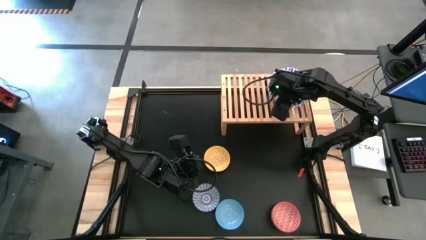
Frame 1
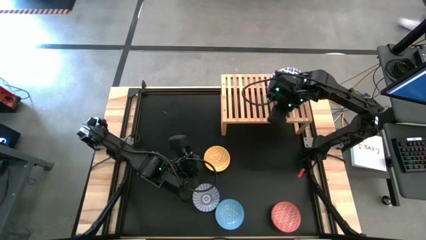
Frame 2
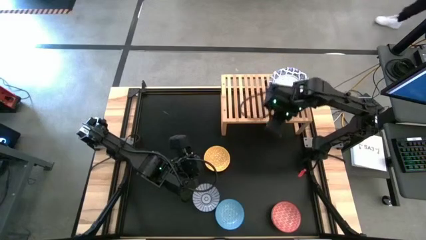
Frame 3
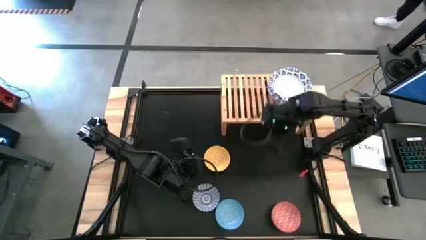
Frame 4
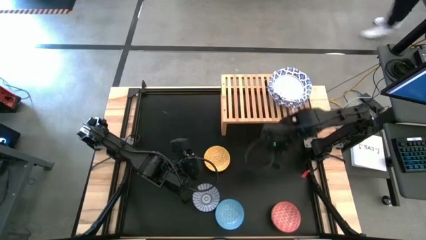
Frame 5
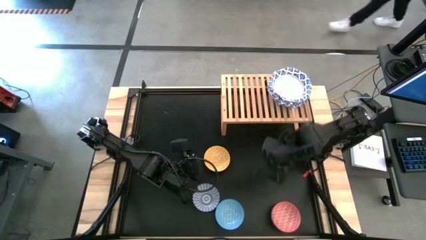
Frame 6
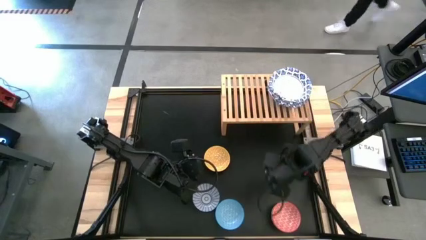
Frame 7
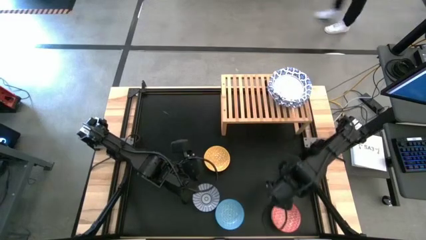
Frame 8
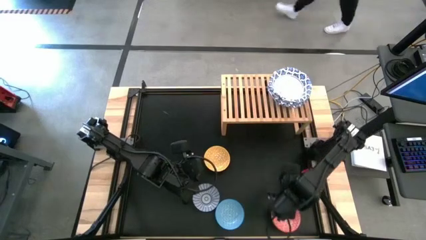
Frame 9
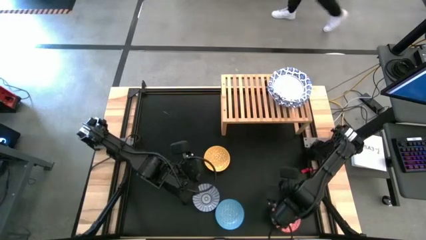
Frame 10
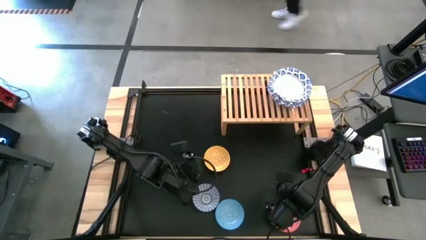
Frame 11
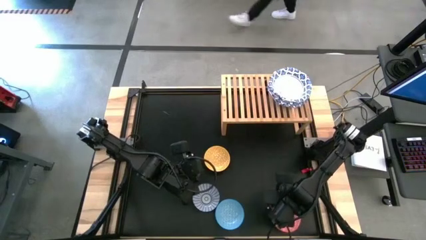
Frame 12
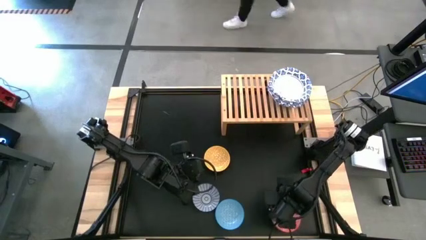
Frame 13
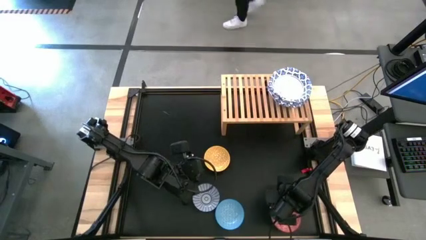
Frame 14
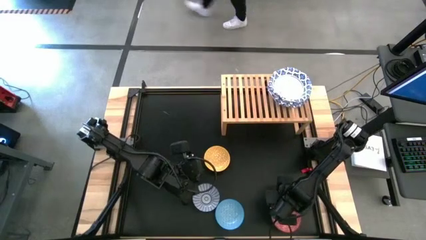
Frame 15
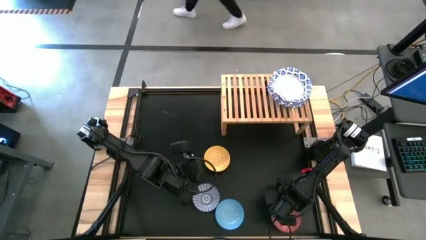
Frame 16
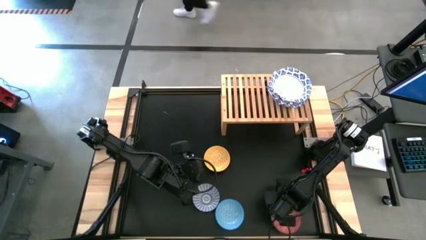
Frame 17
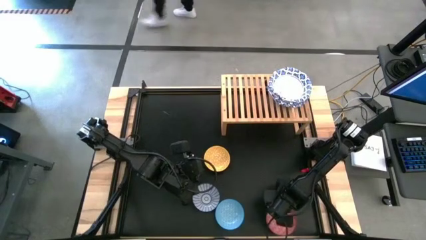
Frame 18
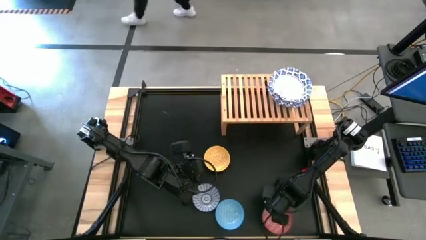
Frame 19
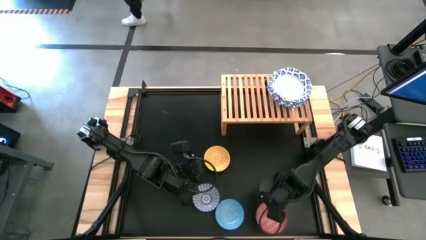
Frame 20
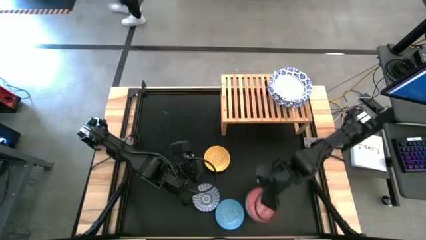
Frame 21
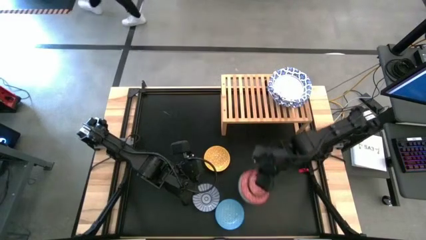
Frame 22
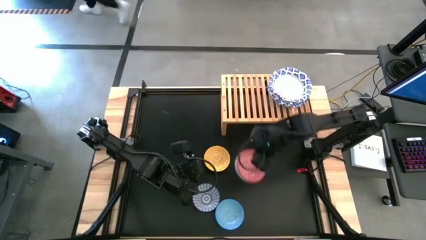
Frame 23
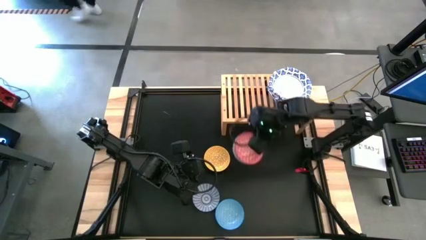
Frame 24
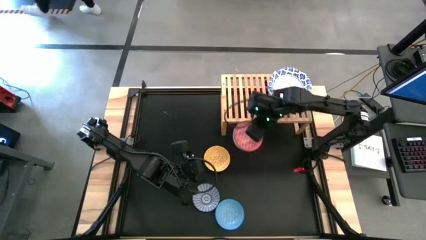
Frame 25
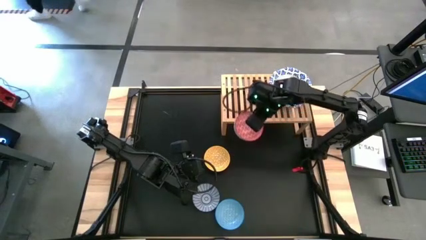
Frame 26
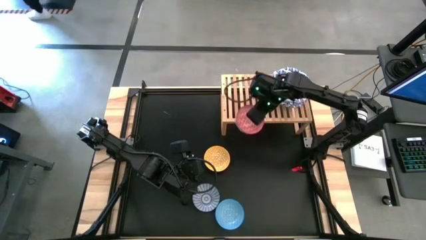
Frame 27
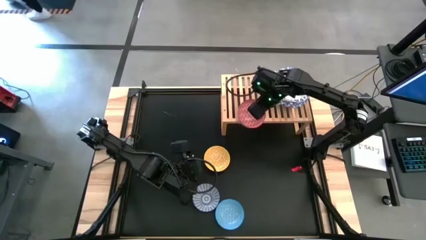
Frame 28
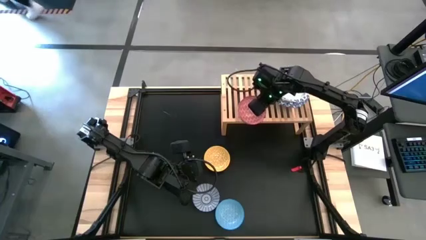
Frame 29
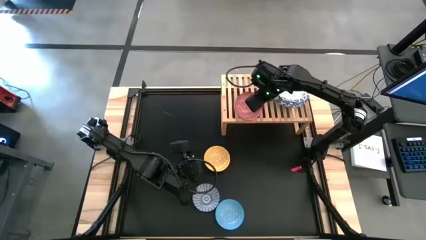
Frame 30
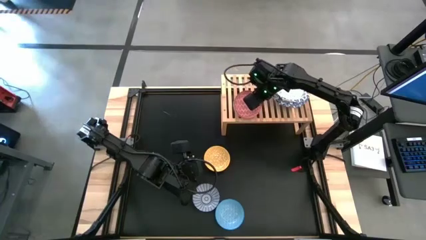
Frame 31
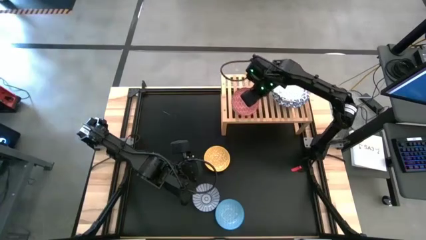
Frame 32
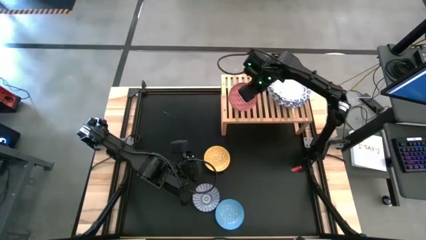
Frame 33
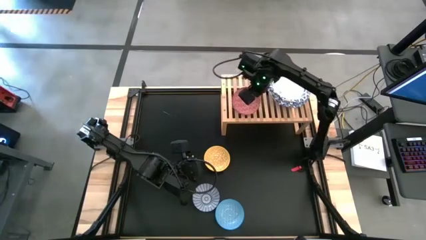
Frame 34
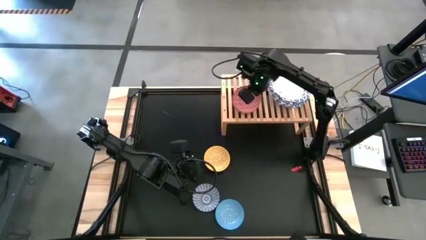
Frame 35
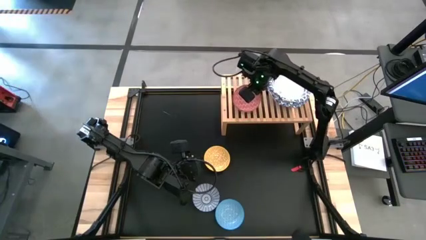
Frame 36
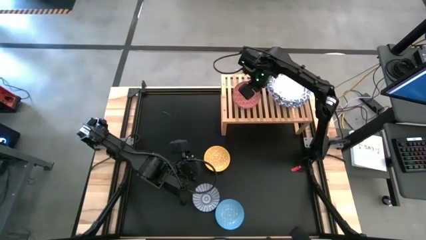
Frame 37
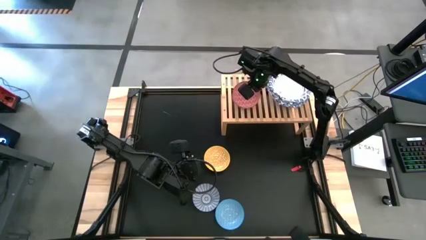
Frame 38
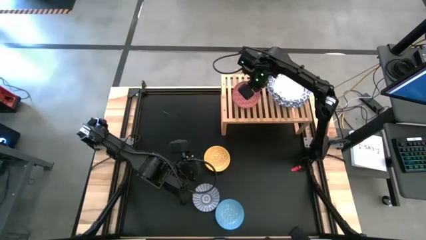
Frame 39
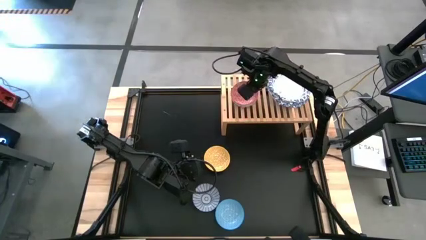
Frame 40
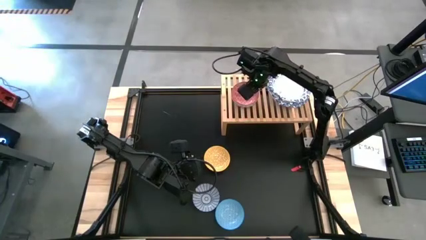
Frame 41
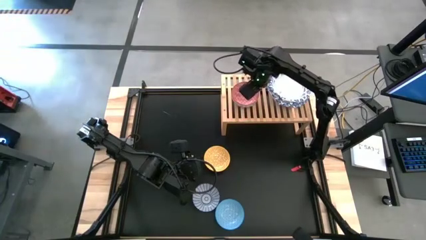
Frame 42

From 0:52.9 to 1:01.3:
Task: Place and stack bowls onto a shelf
Put the red patterned bowl on the shelf

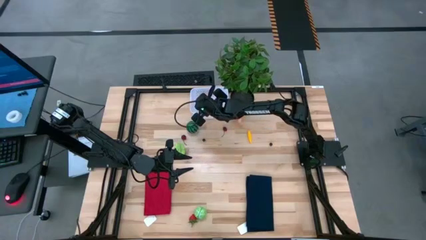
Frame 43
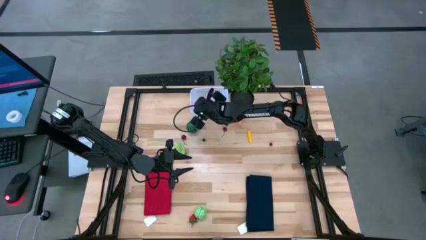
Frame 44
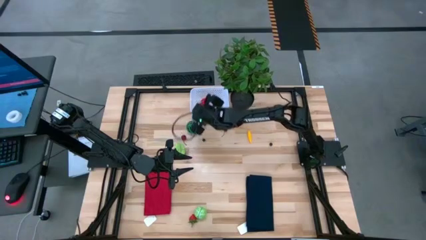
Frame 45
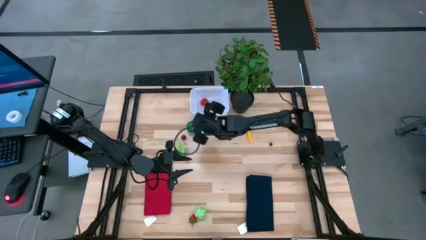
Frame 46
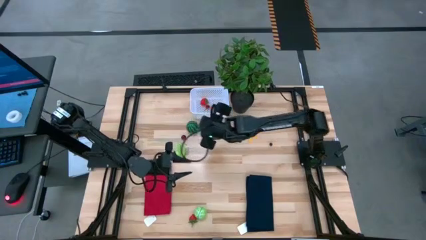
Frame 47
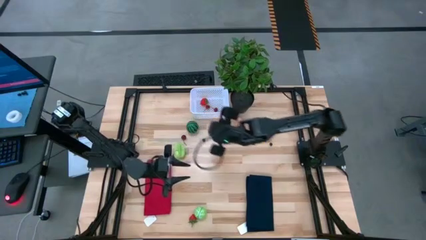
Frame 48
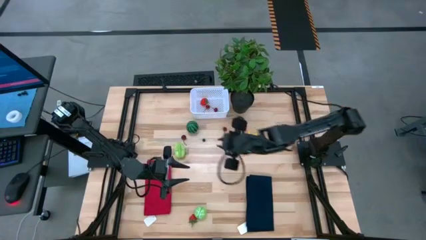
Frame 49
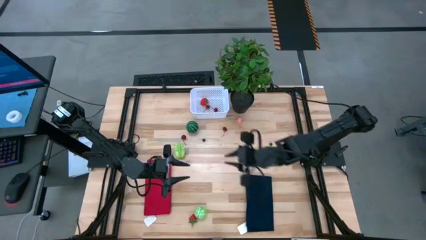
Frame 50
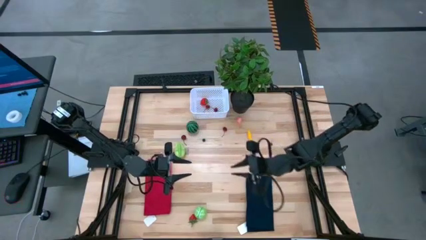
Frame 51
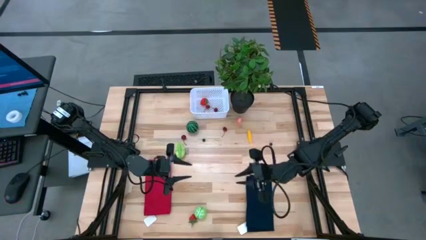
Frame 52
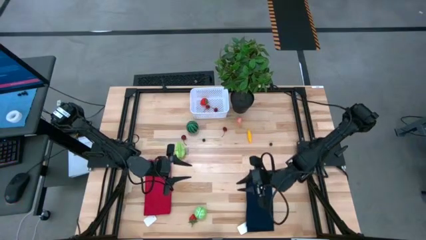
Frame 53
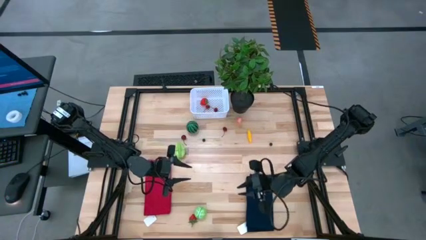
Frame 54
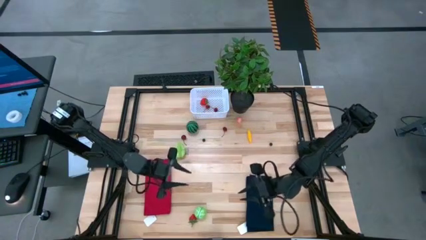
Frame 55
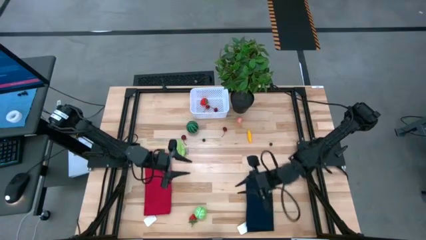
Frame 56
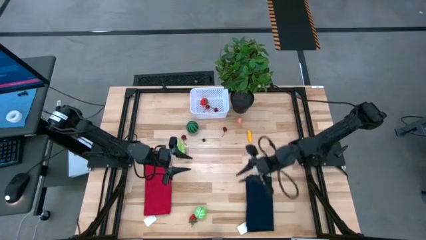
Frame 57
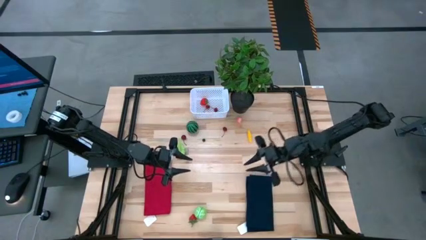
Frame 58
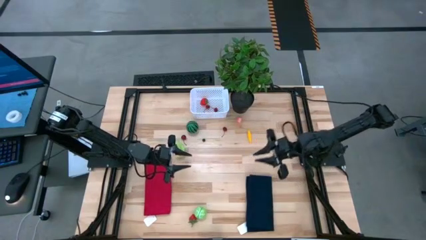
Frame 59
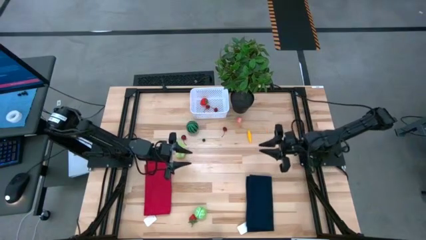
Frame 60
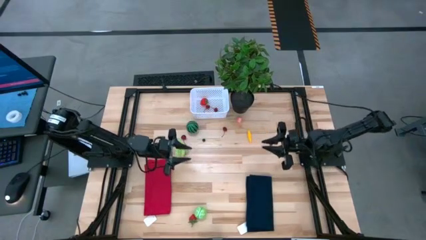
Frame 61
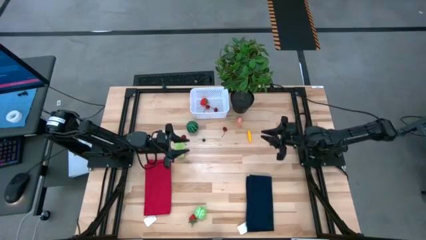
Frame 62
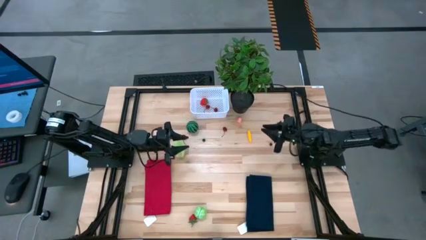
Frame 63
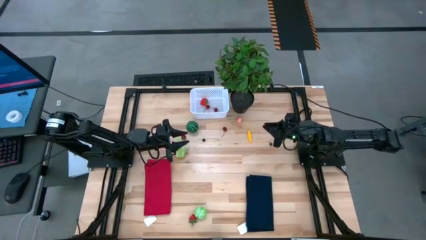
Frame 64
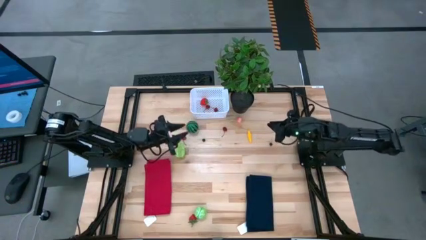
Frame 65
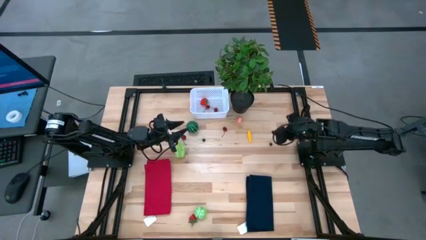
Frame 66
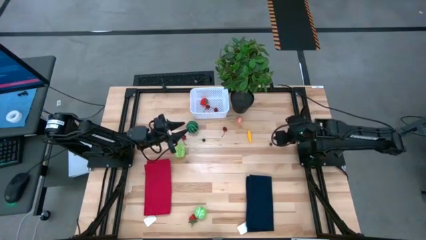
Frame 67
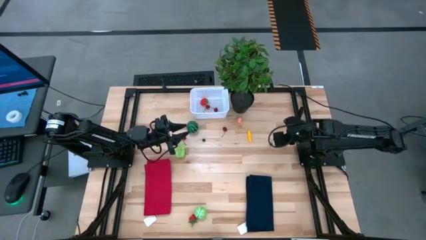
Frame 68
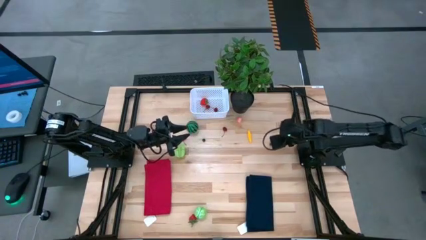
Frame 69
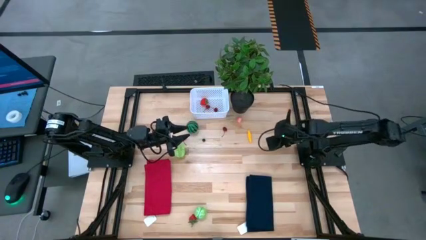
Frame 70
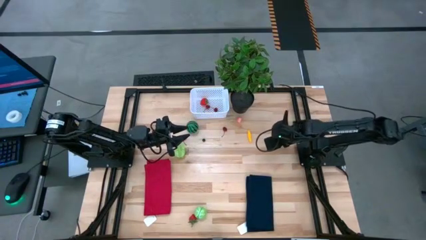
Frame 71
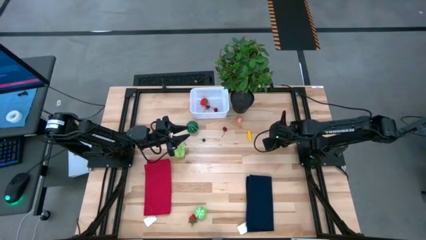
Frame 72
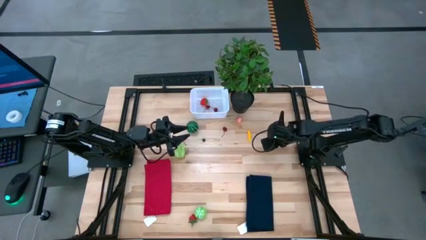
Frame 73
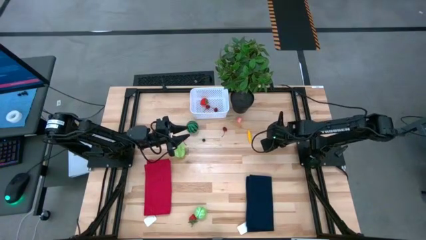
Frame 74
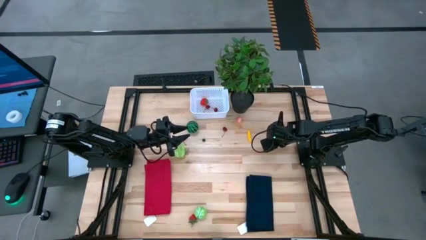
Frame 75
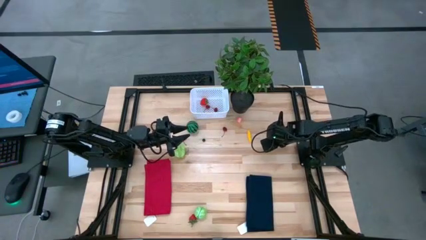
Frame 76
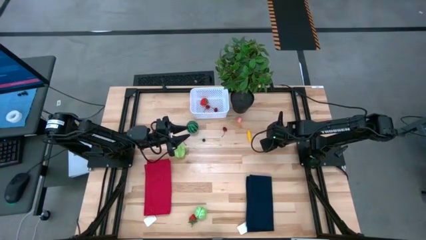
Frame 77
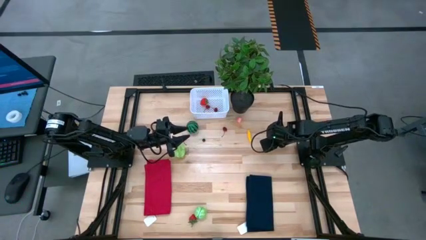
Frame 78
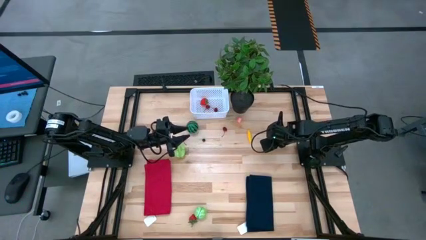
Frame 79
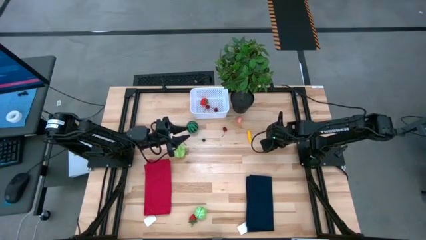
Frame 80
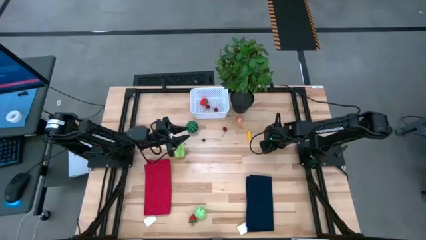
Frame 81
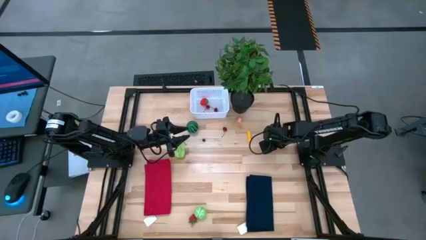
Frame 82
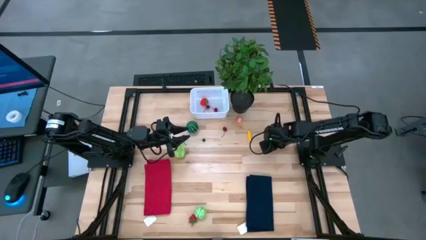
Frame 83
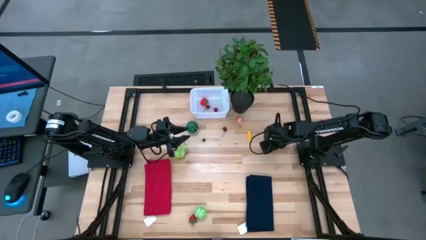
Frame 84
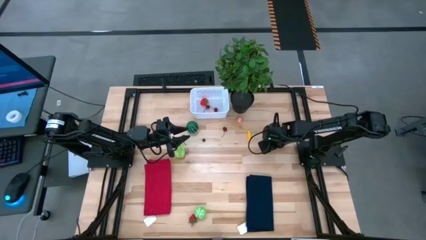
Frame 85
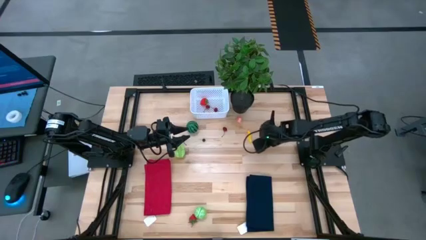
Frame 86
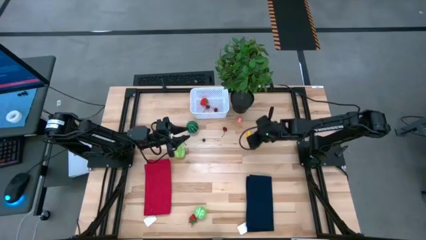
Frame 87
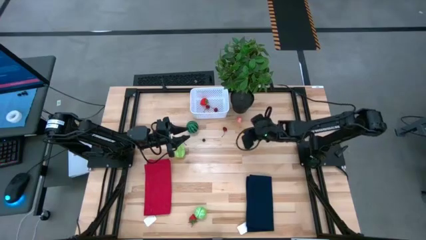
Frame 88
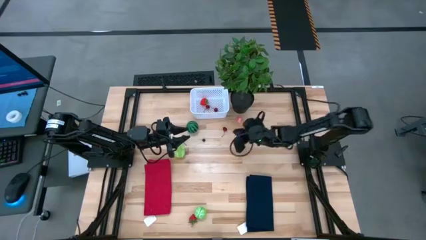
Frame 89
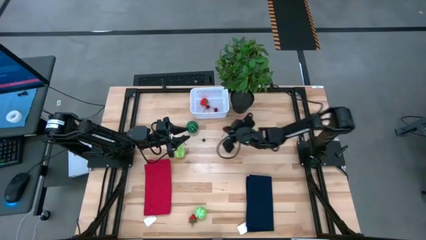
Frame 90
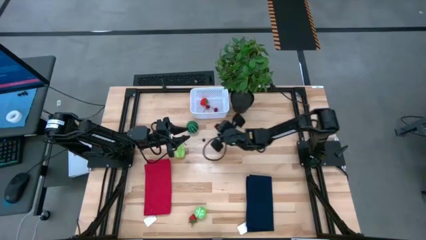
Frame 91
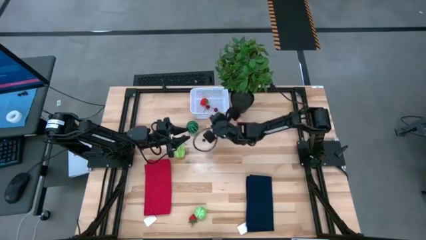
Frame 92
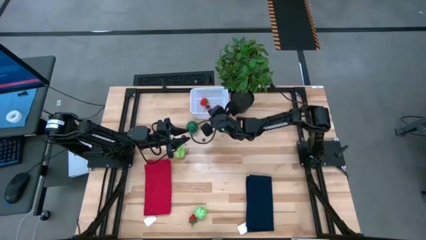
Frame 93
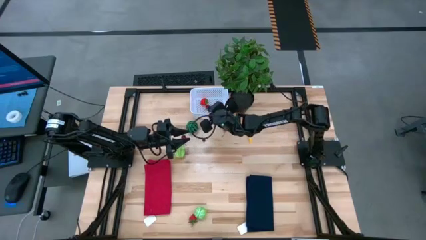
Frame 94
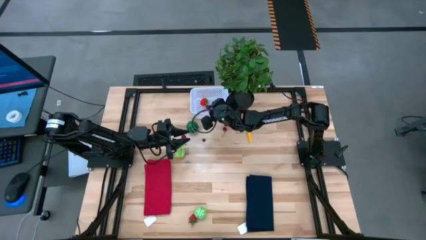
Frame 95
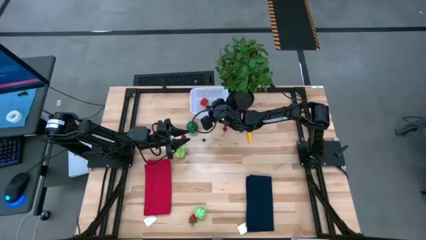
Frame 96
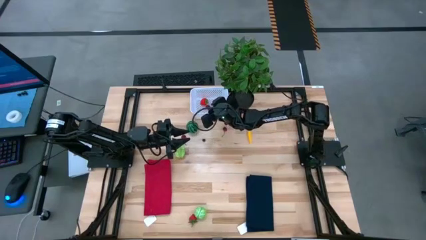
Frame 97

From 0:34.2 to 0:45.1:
Task: Pick and placing Produce into tupperware
Put the blueberry into the white basket
